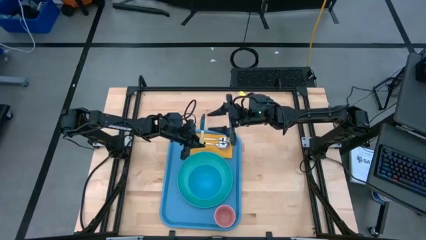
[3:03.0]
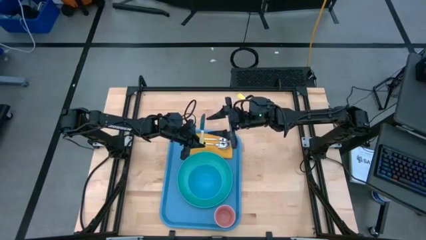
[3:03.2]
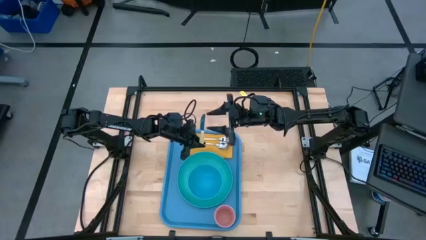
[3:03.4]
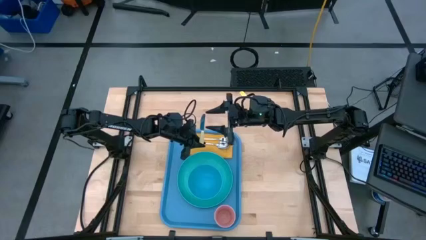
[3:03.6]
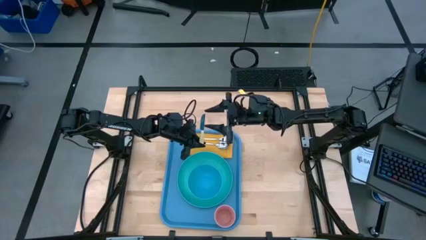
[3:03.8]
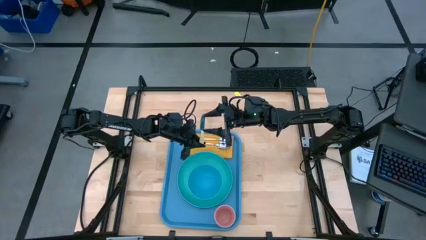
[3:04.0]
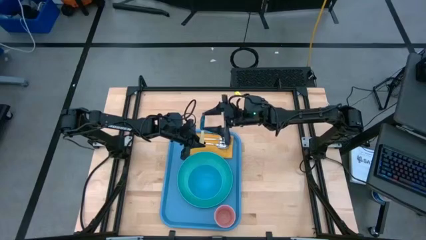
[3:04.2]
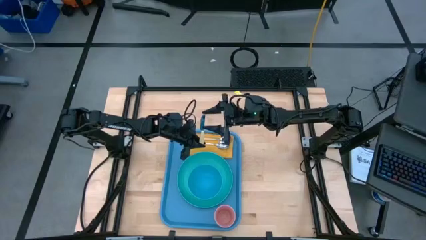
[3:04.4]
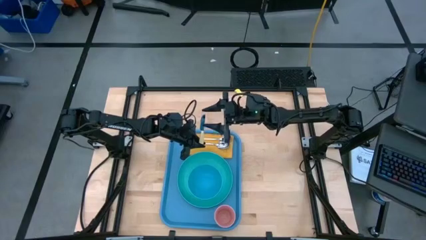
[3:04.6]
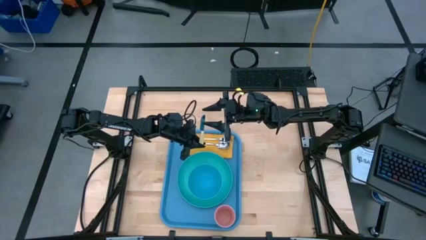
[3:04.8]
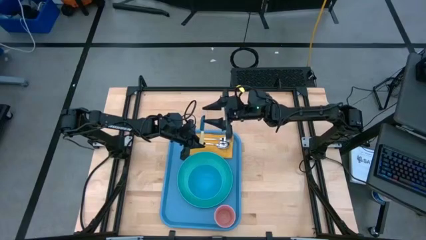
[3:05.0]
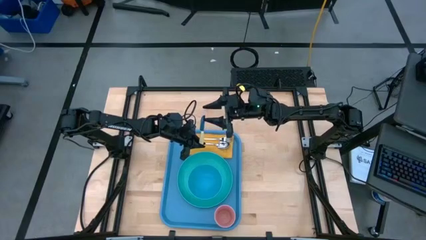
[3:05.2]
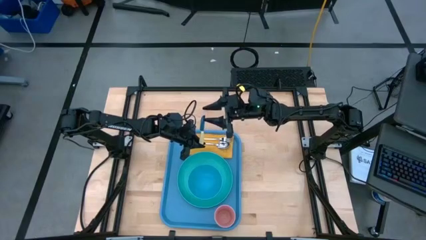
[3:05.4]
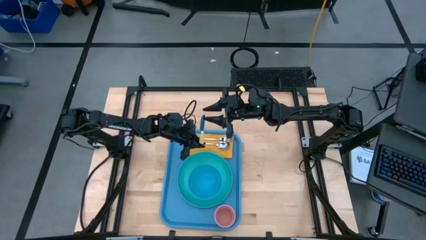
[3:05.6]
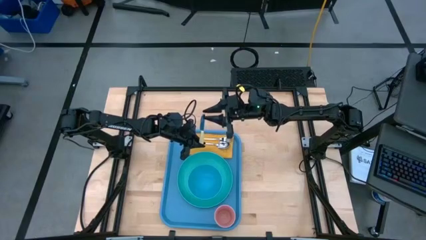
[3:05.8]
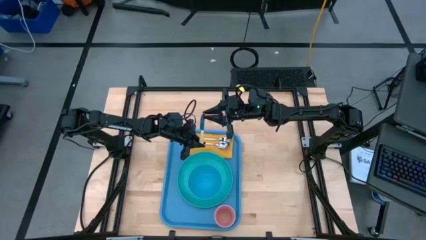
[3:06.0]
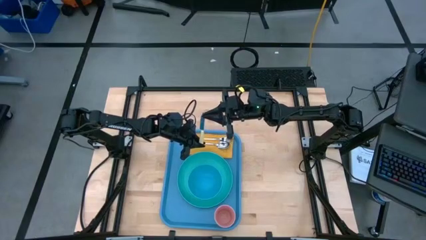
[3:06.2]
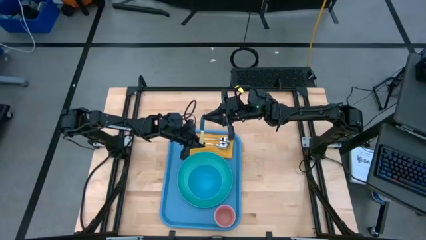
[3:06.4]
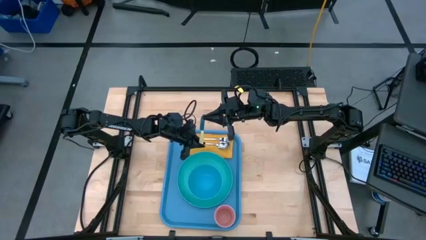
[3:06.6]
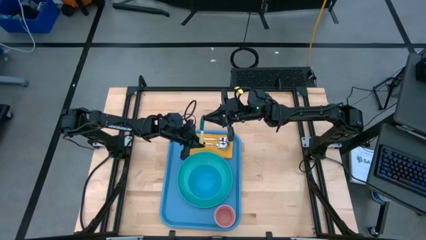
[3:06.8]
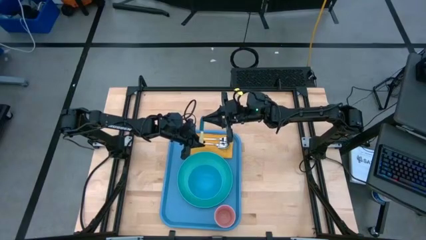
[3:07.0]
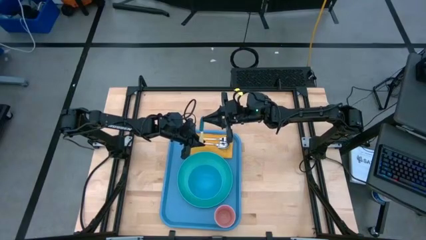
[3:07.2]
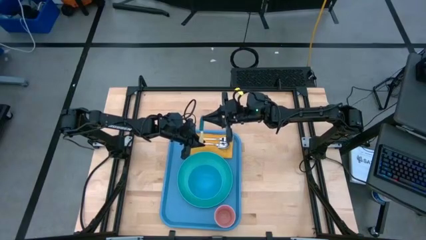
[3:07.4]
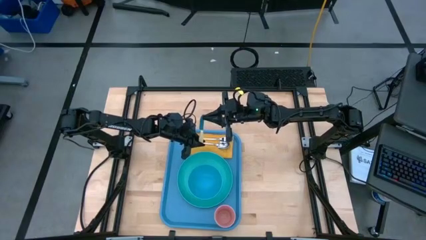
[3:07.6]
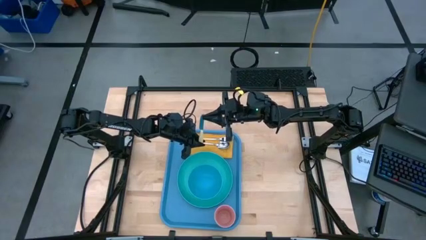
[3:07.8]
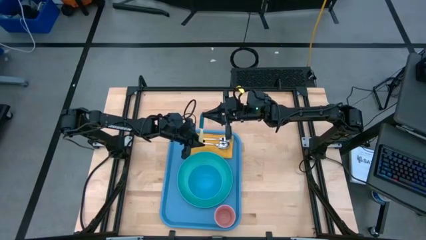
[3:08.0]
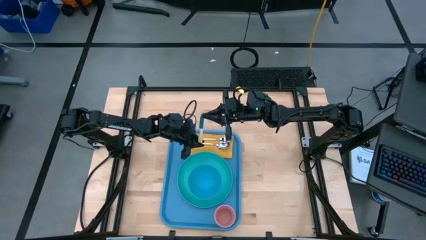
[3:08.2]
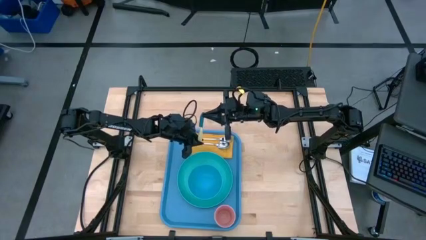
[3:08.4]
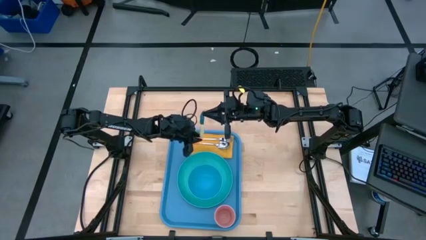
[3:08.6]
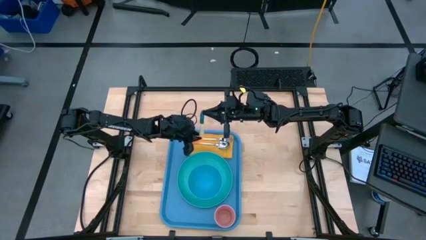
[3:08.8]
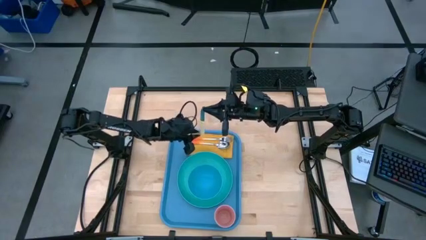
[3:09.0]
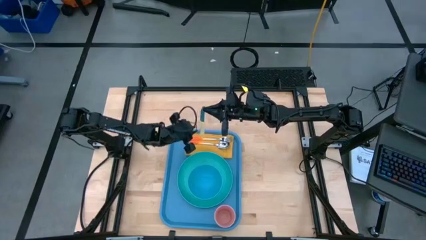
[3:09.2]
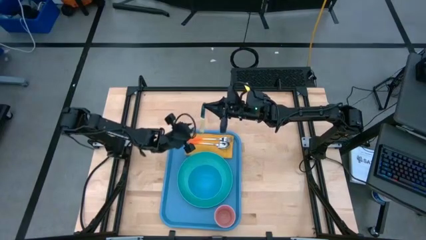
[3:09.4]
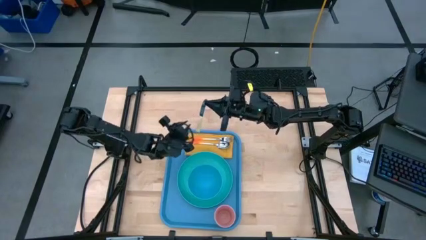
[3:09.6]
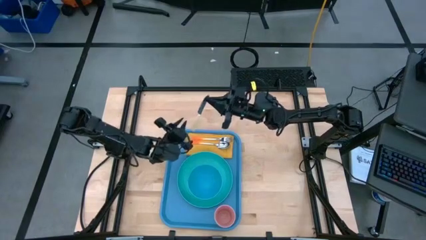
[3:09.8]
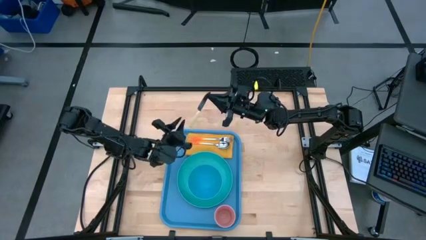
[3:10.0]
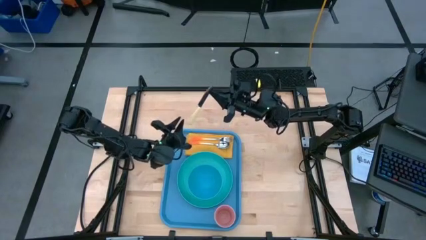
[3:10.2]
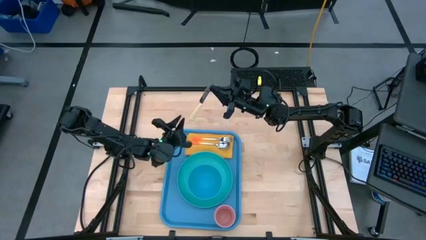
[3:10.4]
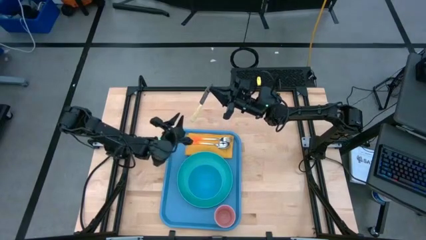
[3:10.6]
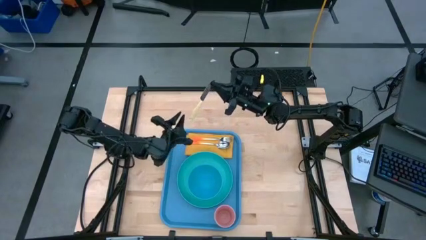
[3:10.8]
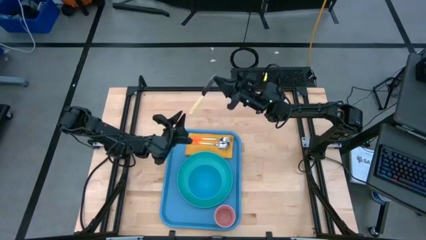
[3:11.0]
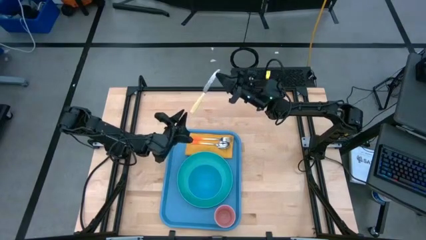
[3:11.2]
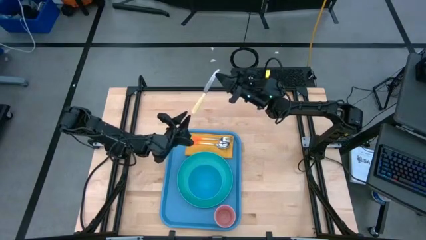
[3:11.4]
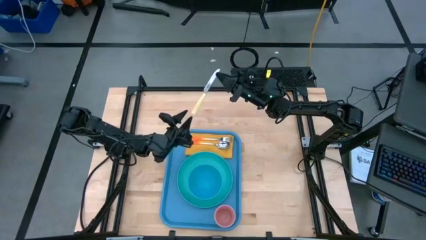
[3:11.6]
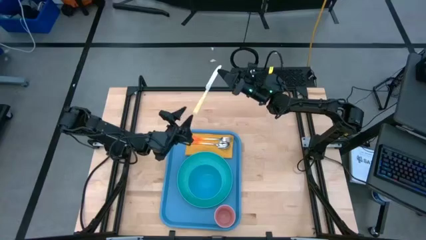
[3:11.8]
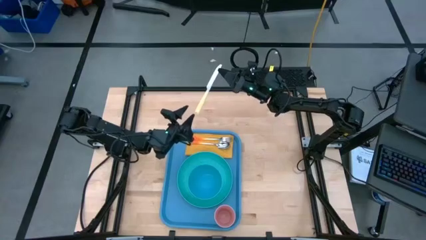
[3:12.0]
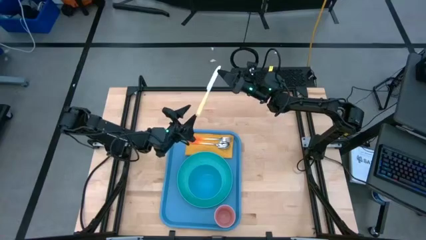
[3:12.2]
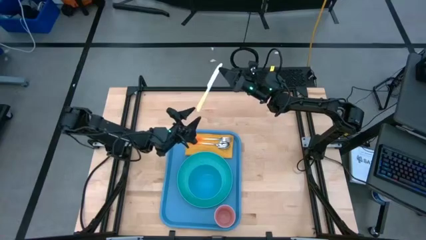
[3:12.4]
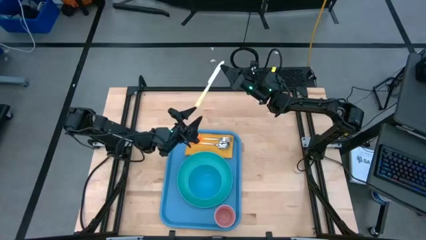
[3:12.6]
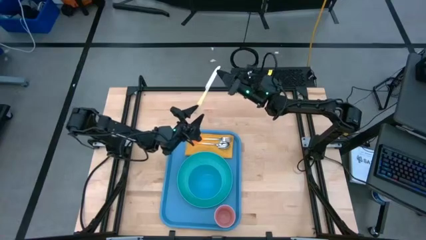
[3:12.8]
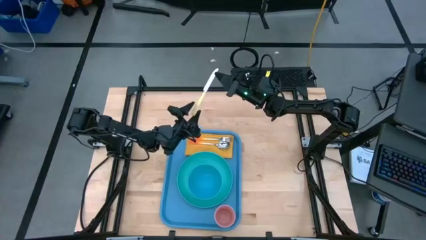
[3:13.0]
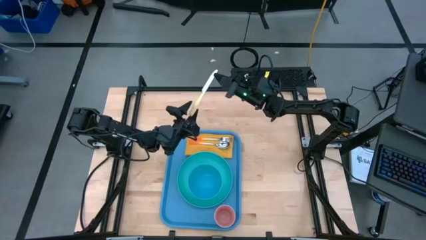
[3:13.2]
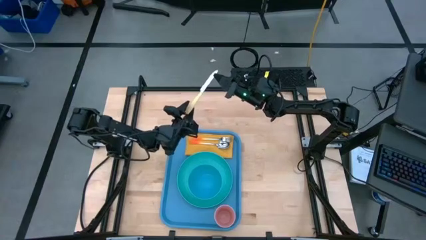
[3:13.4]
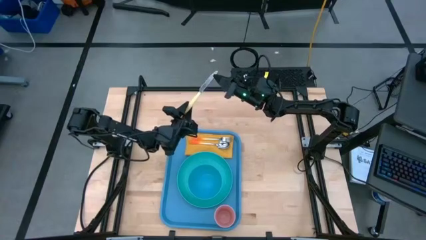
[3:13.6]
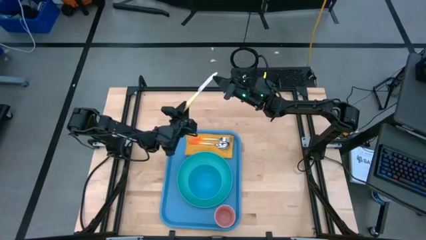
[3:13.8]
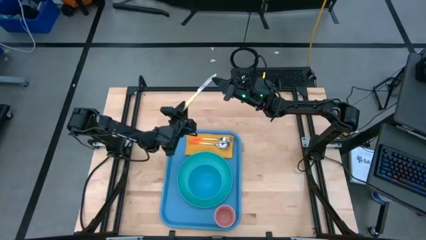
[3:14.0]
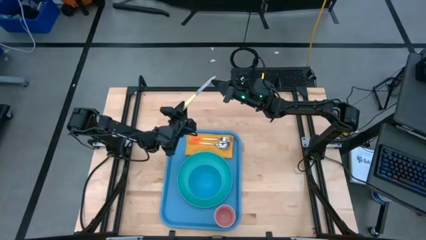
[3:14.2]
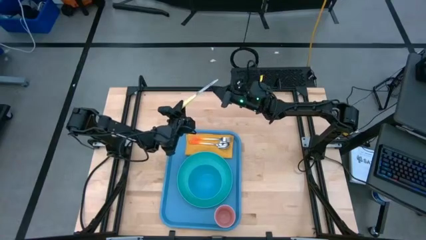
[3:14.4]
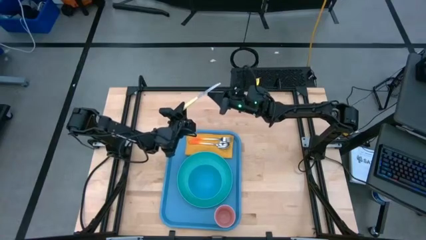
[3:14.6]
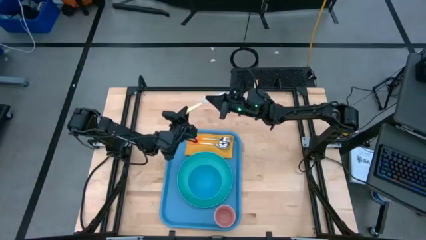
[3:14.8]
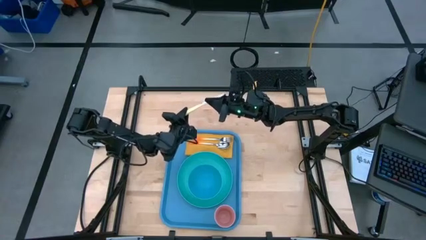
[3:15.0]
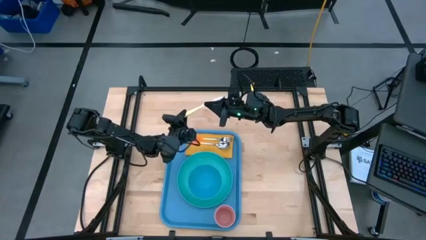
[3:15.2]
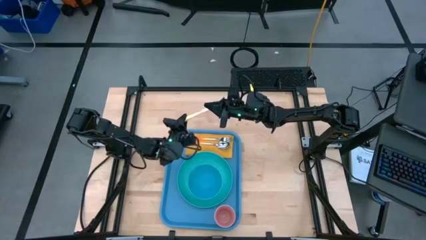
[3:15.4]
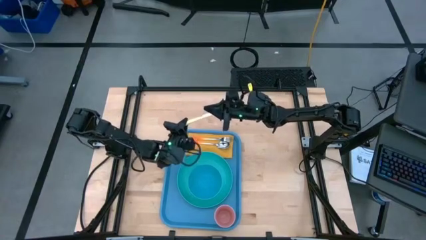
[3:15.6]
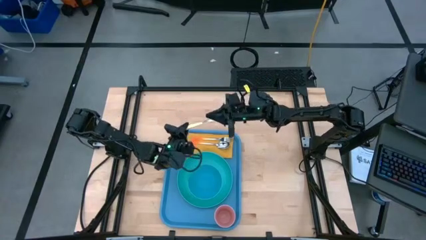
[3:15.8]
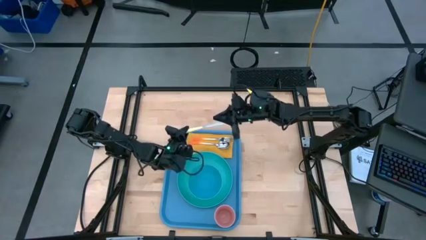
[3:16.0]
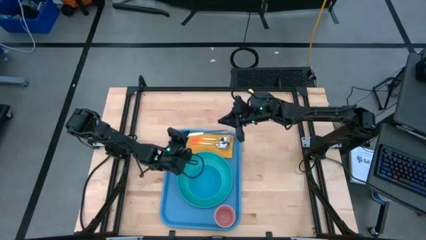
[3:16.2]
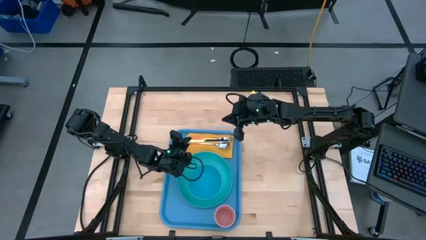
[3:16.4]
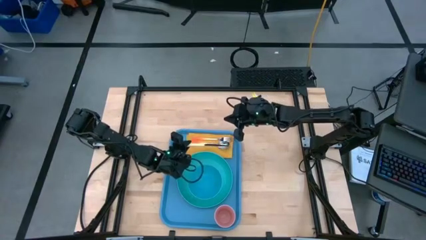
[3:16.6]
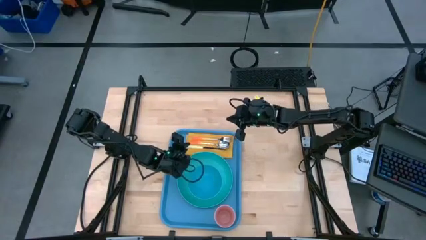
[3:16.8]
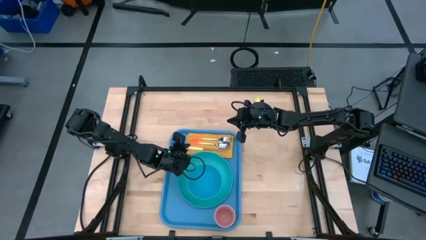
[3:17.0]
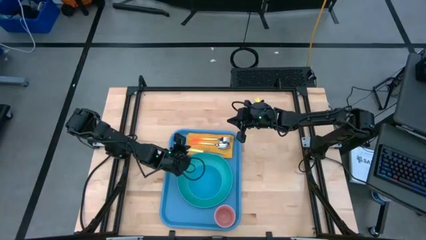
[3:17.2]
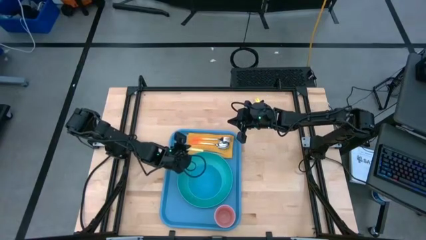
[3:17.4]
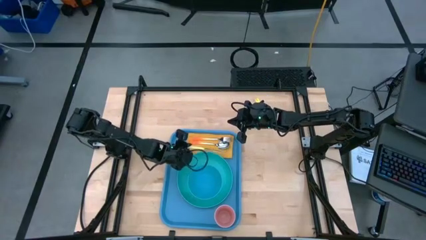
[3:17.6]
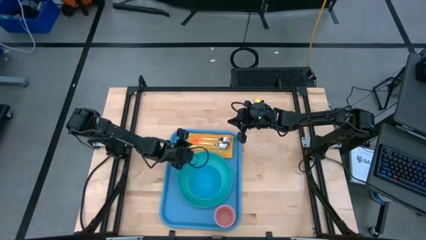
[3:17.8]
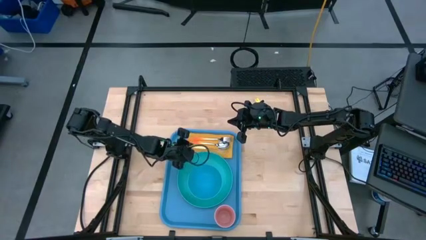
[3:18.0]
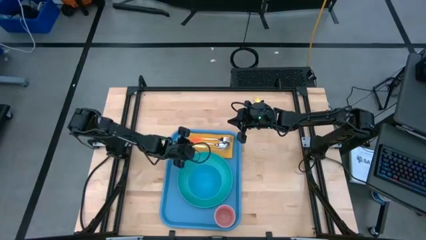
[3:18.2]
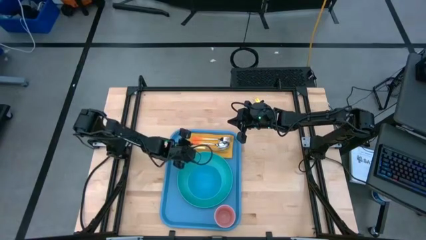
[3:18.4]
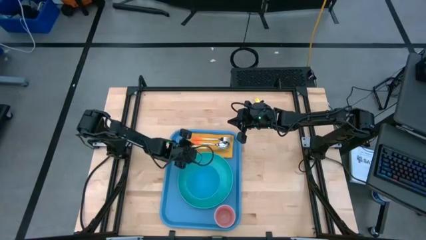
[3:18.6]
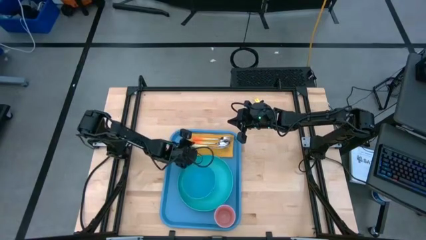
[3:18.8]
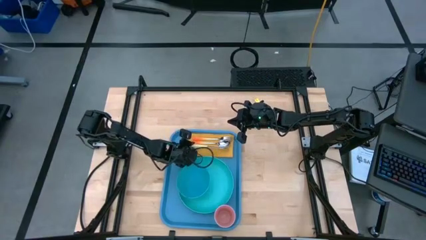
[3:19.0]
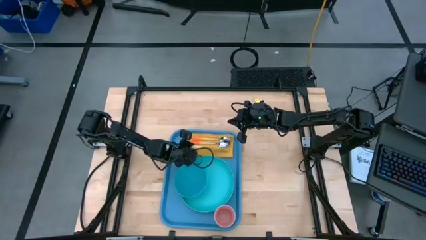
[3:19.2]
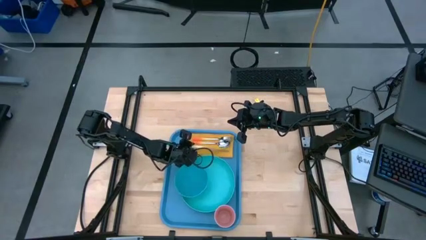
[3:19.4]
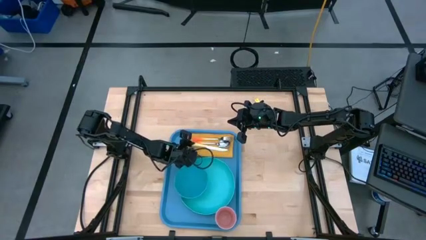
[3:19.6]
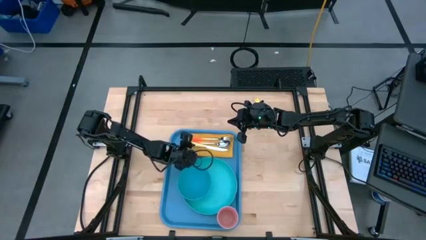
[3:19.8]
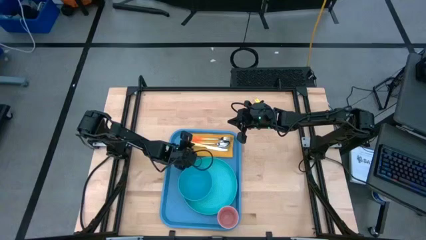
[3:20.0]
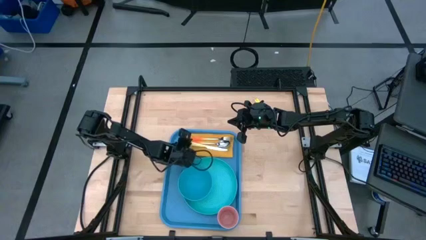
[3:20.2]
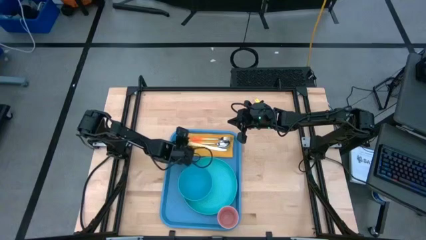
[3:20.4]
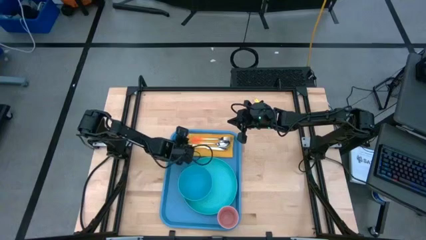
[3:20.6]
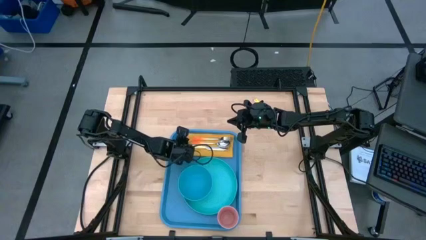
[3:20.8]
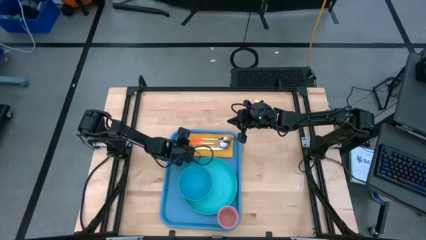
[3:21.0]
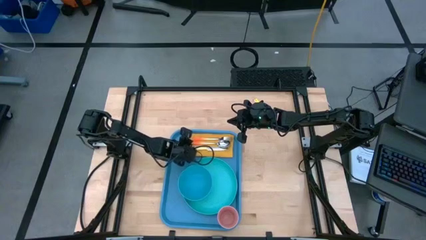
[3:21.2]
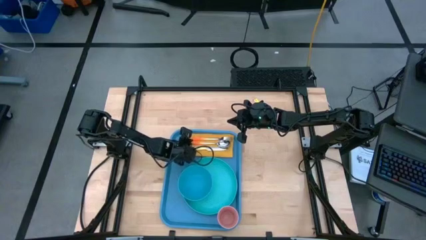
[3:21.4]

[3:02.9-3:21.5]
Task: Set up tray
Put the light green knife on top of the orange napkin to the bottom of the orange spoon
